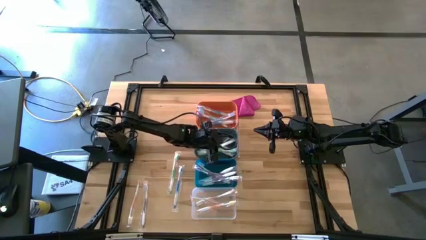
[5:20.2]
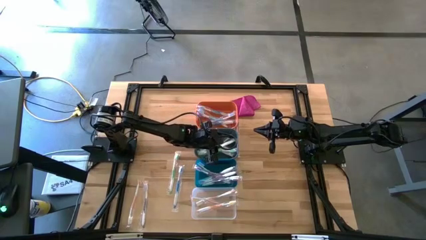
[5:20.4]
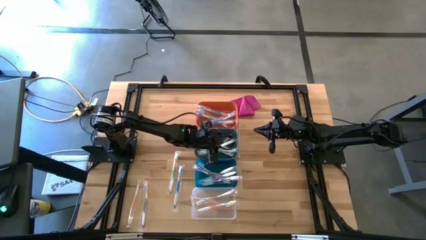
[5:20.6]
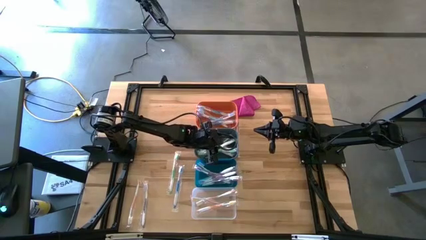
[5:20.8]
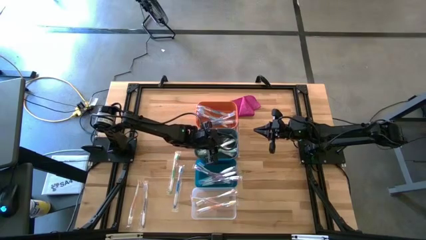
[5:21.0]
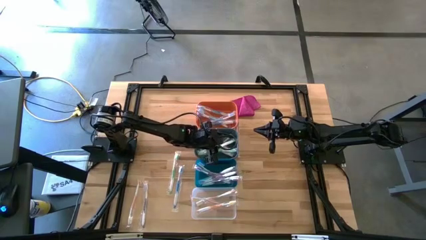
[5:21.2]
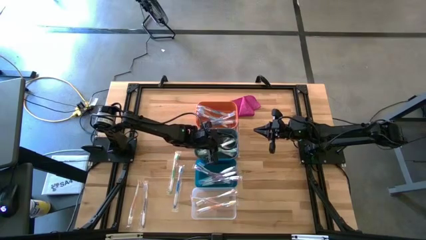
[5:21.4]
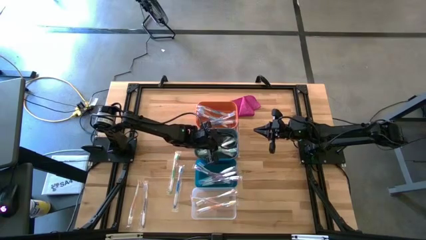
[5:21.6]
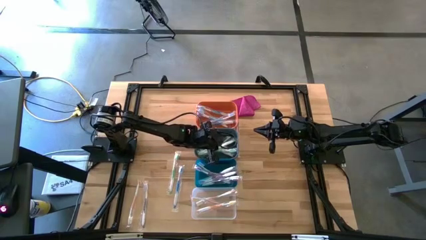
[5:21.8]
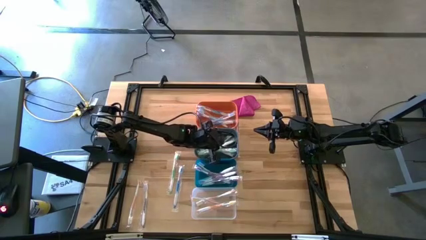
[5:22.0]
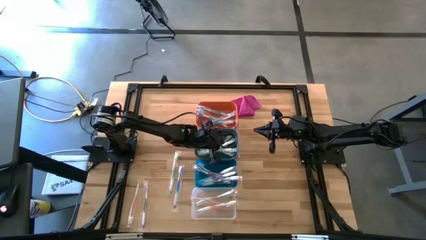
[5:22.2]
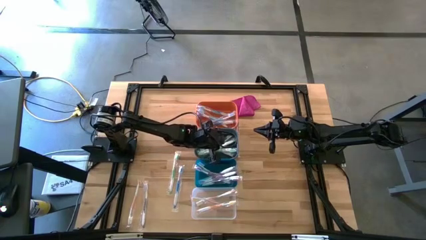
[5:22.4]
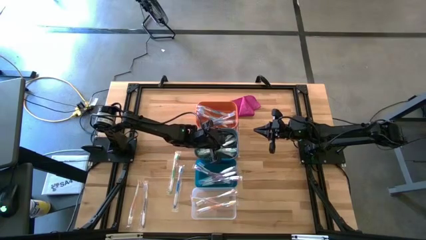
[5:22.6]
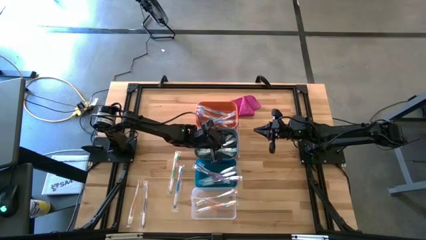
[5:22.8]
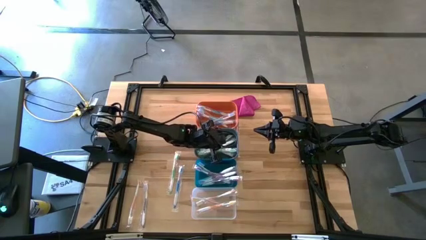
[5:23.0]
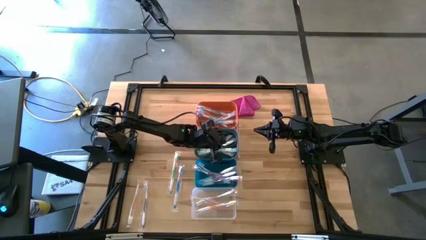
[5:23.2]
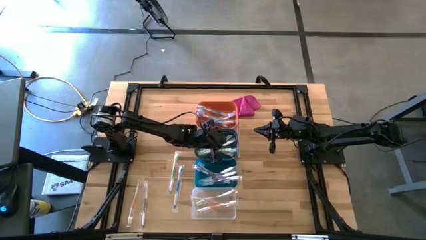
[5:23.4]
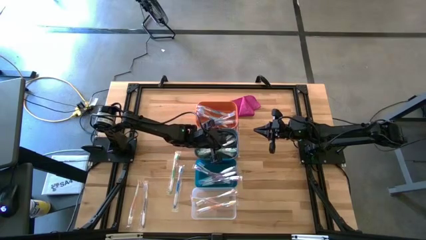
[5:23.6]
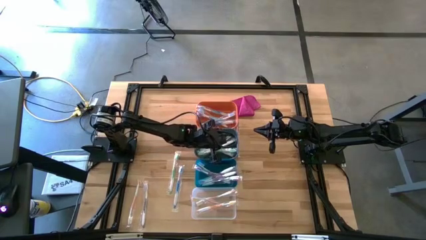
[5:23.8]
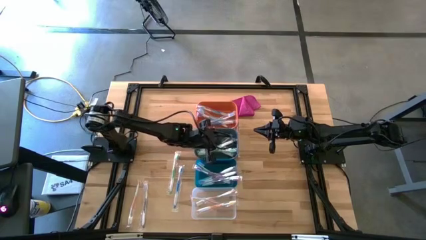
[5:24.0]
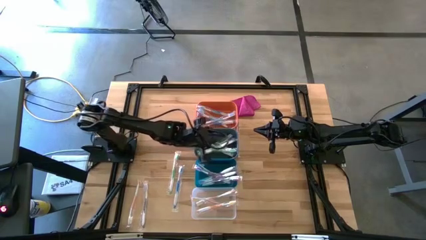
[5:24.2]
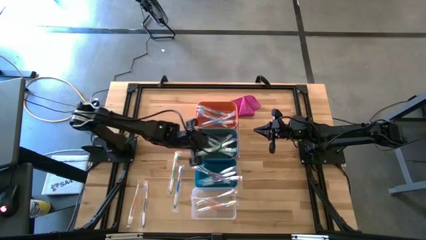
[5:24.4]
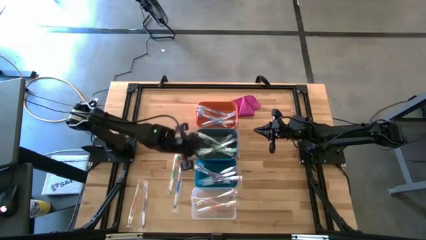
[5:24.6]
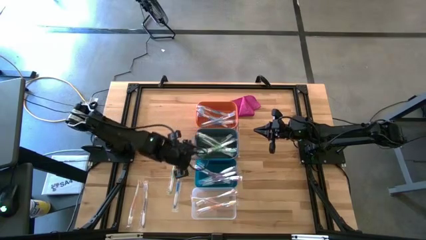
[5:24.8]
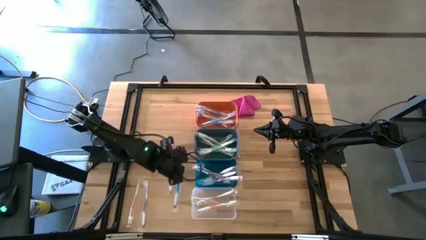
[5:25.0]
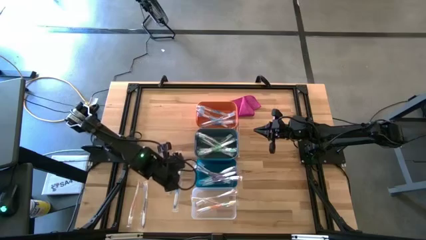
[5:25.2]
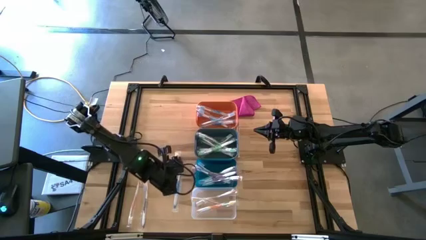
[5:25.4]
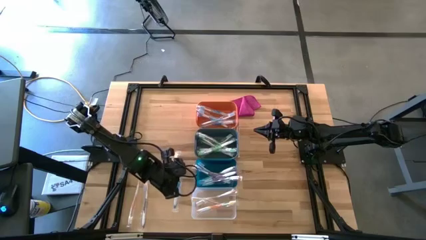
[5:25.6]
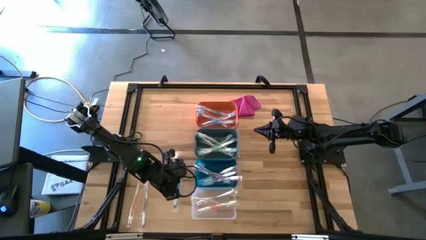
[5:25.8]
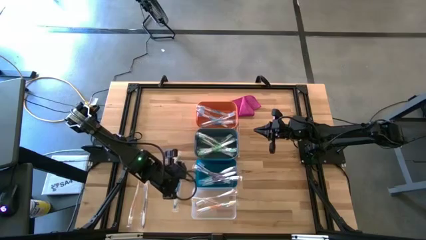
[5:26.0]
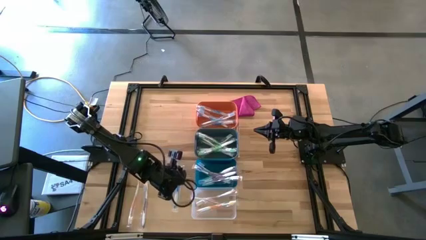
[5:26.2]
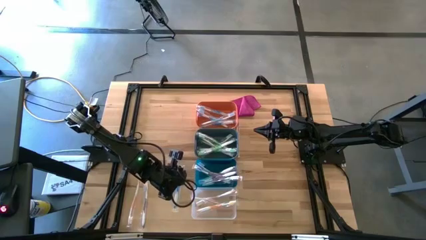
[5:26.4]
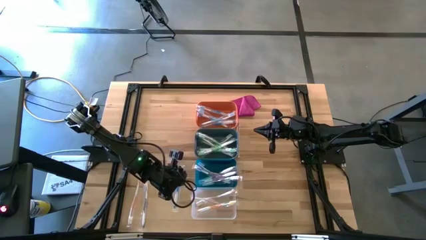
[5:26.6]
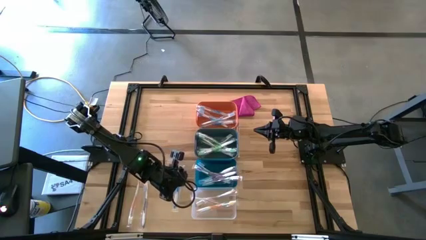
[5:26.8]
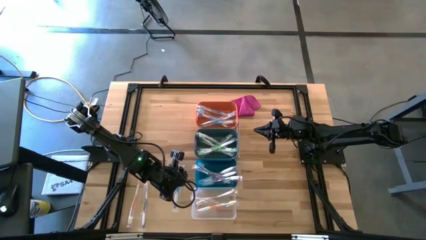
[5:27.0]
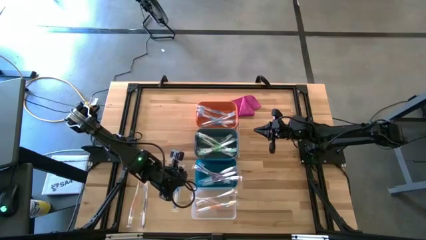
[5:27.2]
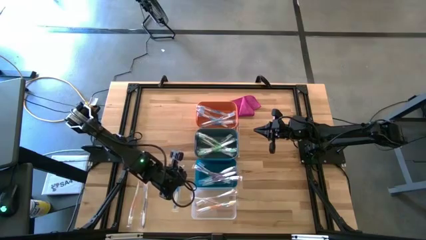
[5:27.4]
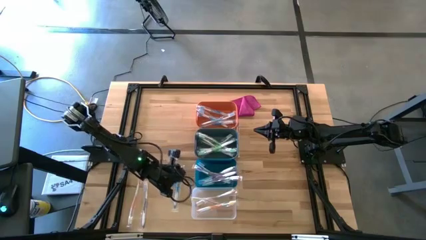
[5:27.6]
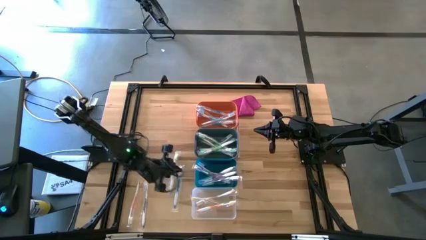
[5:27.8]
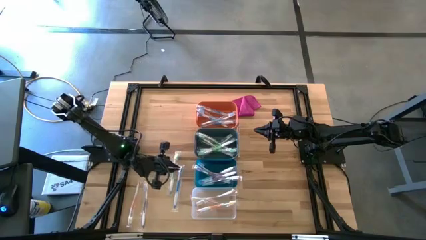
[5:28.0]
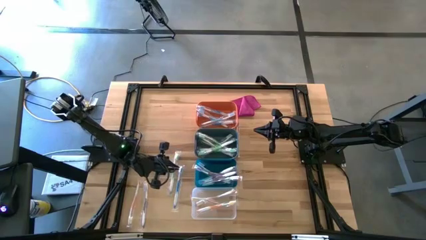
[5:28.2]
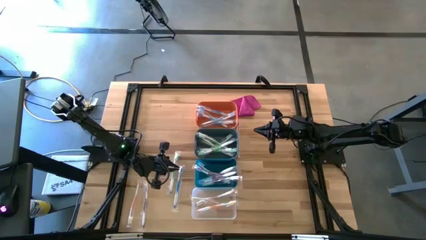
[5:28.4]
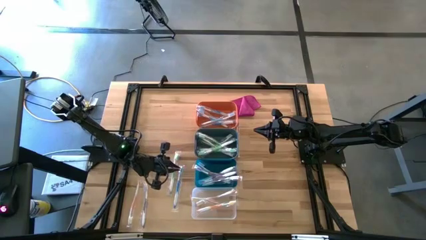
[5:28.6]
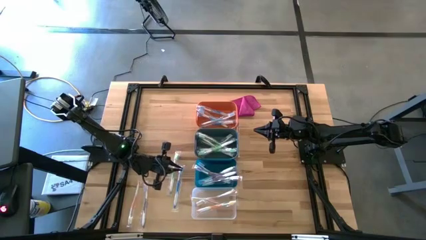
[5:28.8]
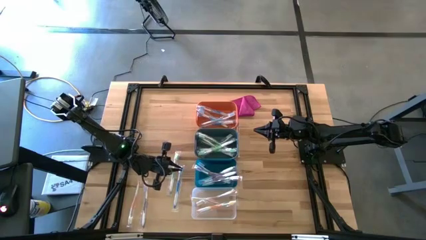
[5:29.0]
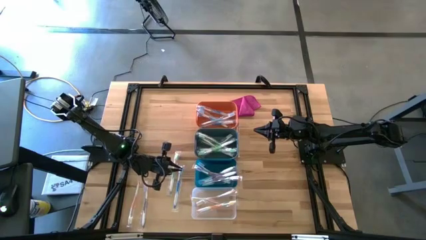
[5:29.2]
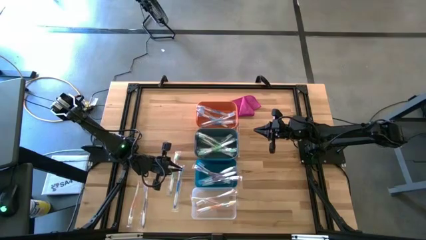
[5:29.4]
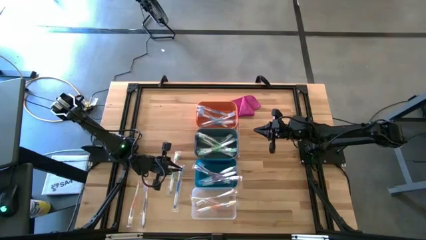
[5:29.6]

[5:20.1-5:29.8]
Task: Pick & Place Toothbrushes
Put the green toothbrush into the green bin

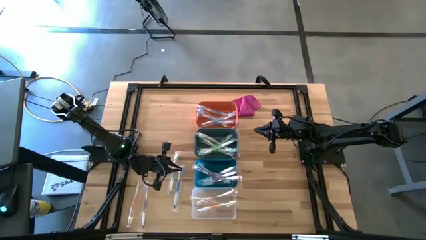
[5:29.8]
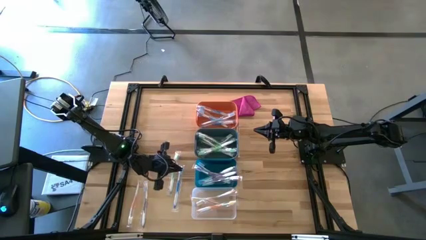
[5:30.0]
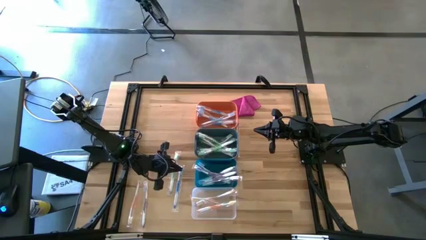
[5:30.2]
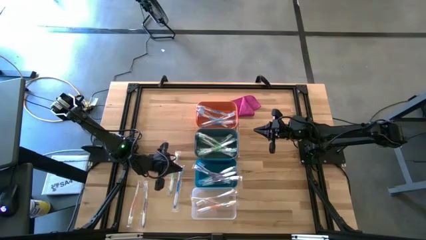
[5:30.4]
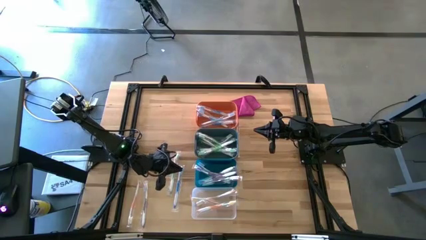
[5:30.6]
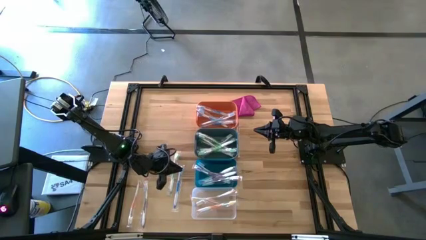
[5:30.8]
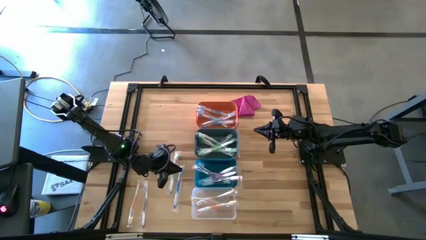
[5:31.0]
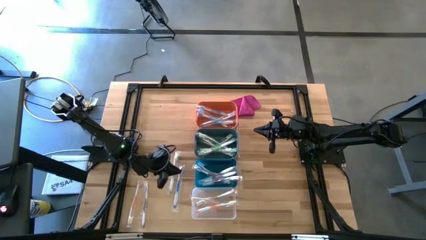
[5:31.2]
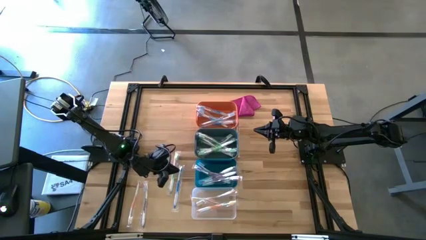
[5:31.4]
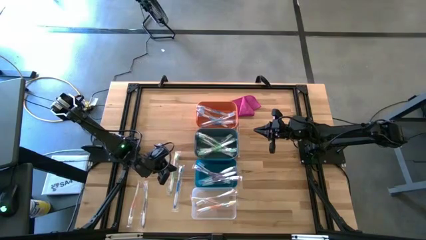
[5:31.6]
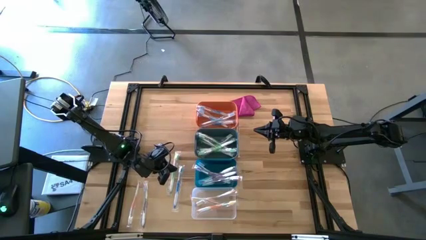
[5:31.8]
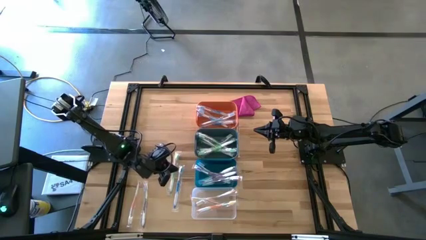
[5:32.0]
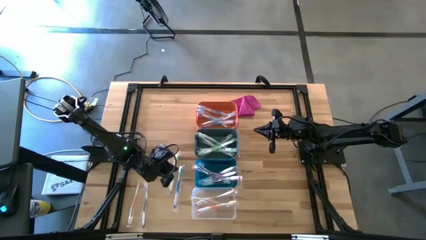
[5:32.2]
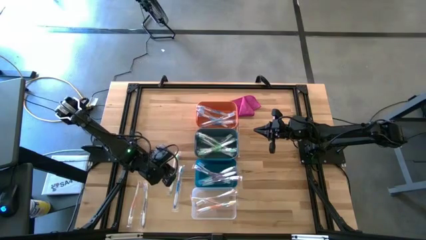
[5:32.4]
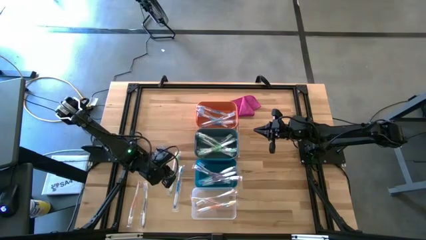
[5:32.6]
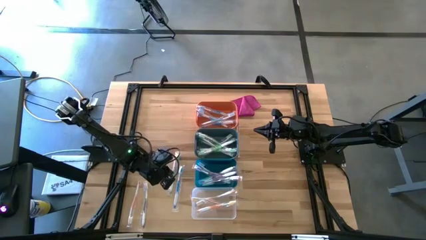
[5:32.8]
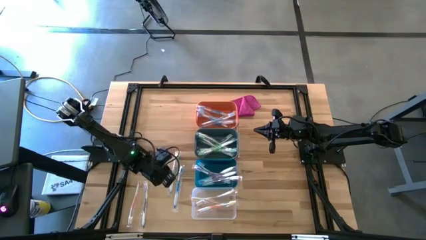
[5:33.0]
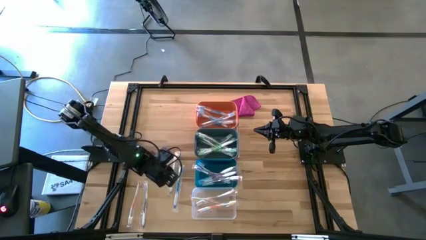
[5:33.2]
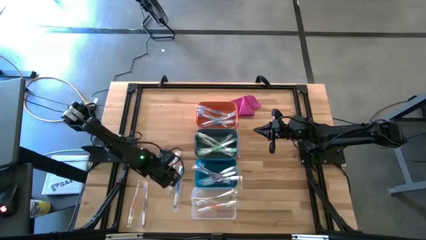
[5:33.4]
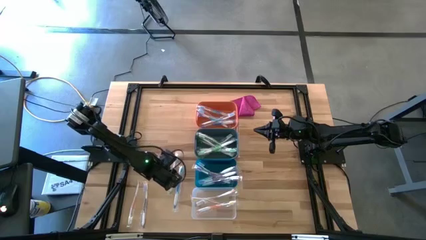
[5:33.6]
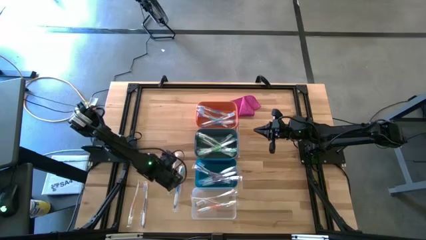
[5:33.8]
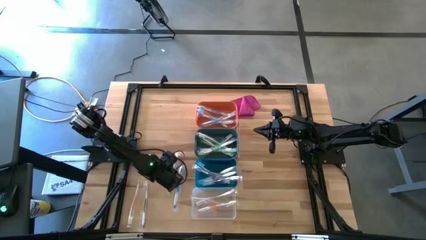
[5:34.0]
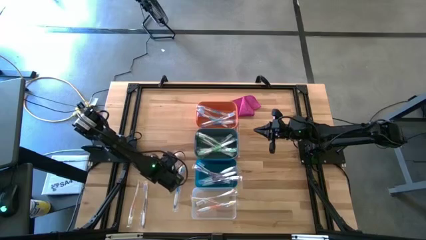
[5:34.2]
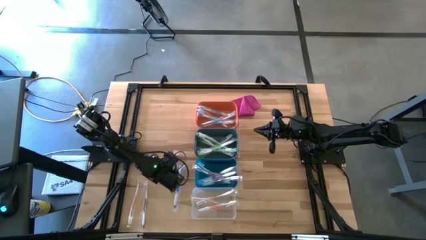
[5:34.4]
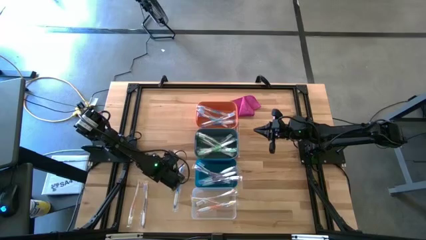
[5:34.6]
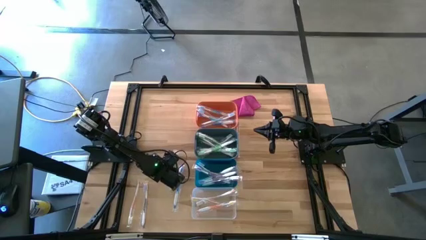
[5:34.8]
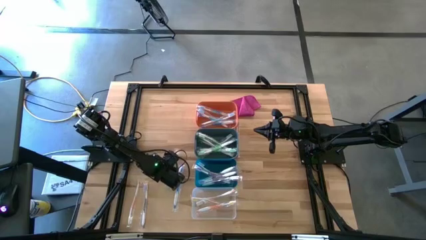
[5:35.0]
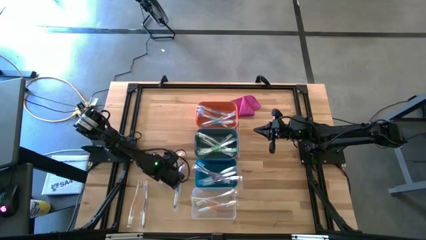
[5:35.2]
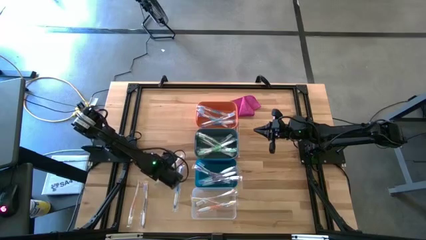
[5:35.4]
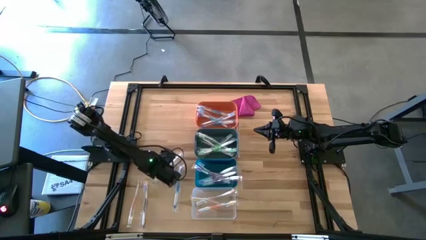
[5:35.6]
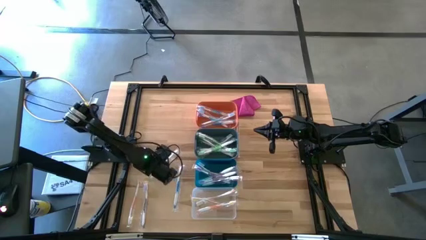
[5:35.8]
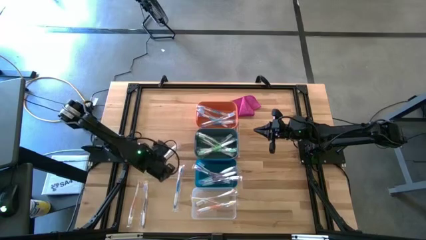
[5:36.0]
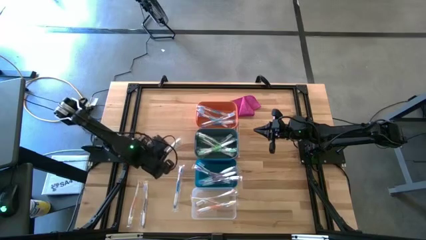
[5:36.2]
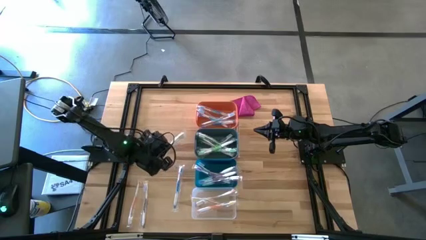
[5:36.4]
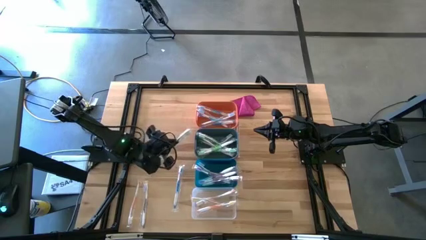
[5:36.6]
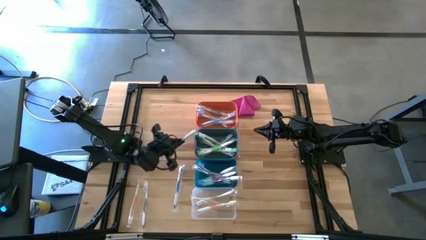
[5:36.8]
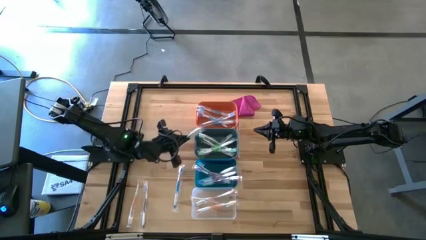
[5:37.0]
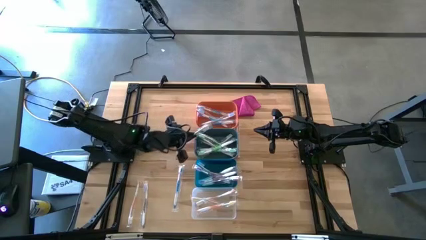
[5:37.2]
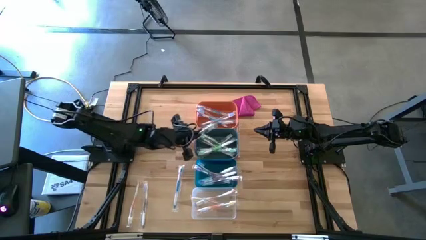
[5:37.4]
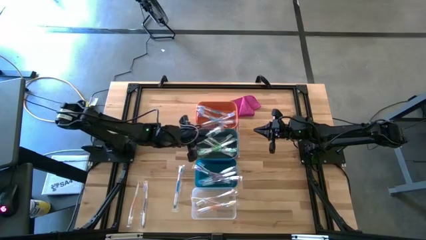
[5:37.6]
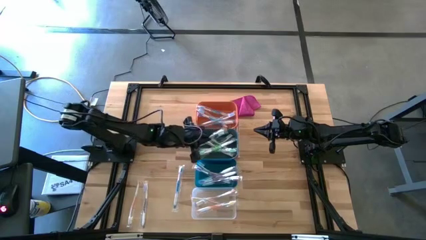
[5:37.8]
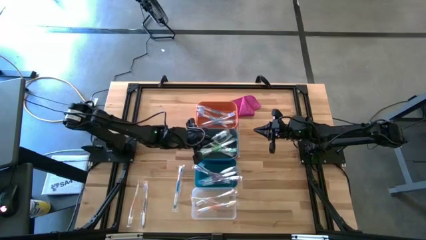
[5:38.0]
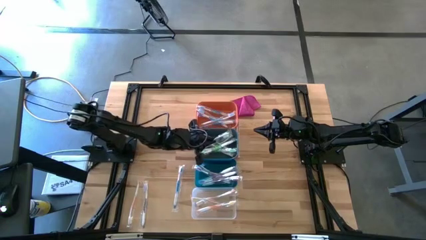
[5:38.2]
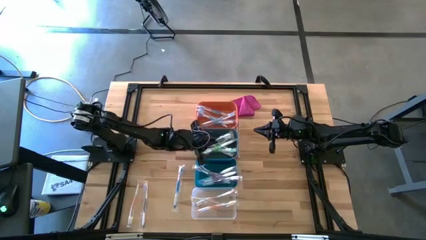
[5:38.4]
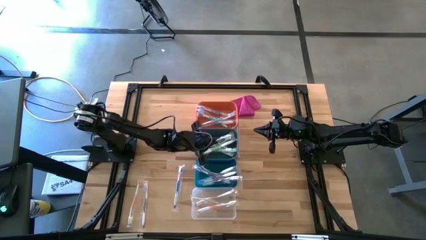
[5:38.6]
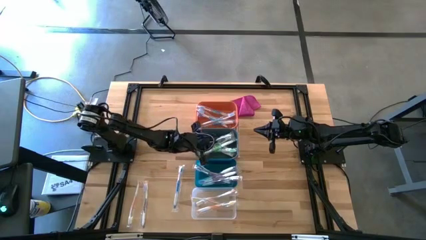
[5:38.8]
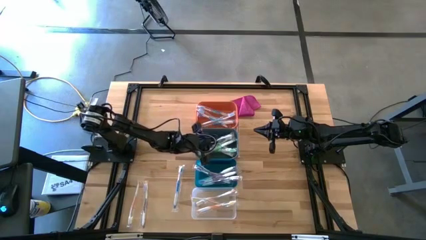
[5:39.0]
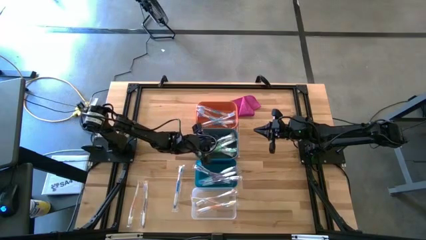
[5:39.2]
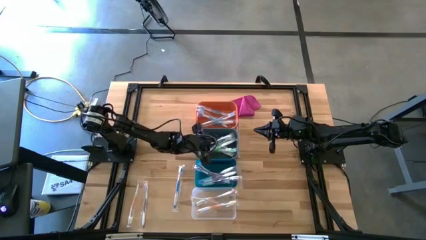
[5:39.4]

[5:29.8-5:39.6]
Put the green toothbrush into the green bin
